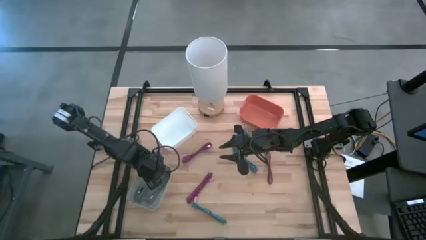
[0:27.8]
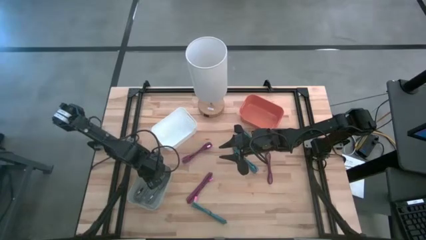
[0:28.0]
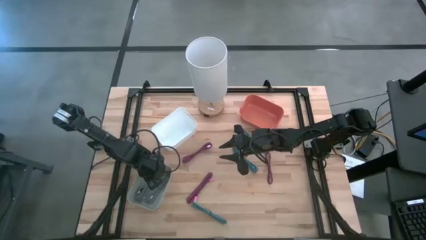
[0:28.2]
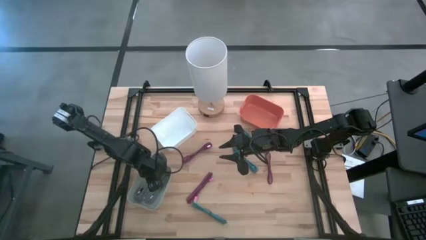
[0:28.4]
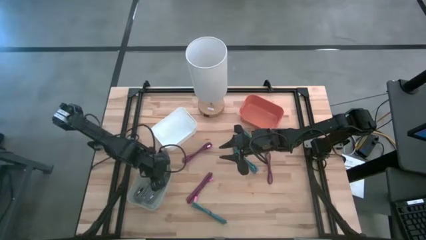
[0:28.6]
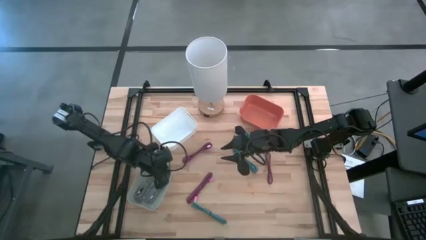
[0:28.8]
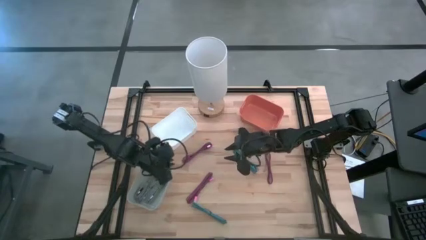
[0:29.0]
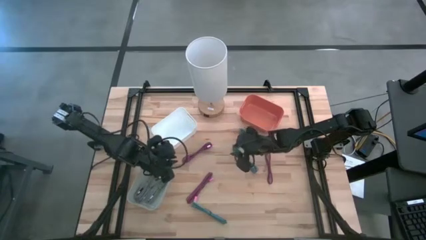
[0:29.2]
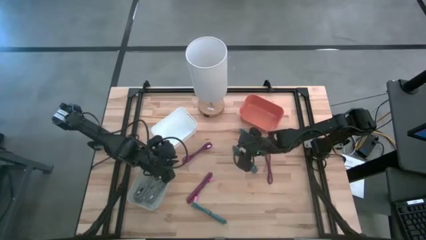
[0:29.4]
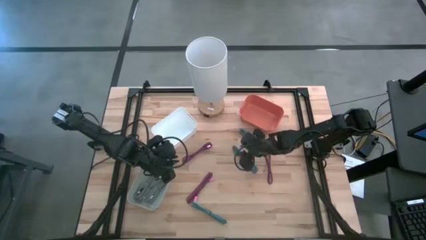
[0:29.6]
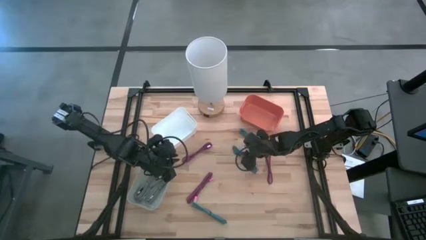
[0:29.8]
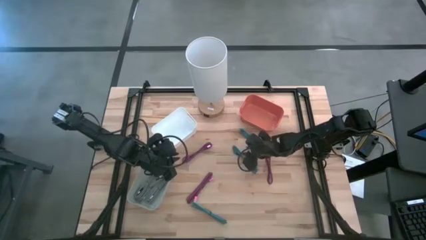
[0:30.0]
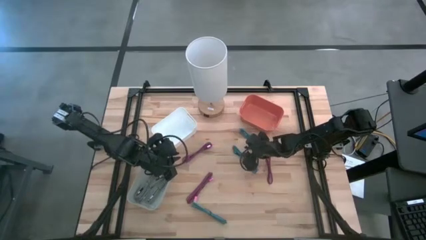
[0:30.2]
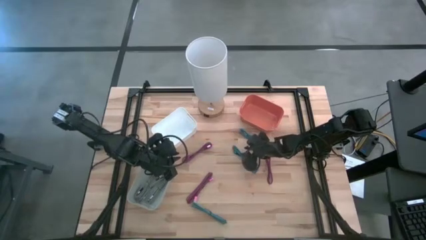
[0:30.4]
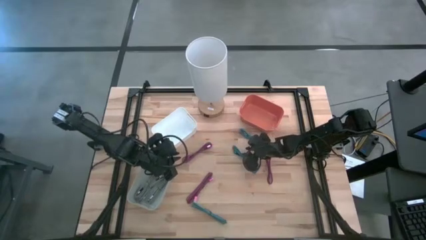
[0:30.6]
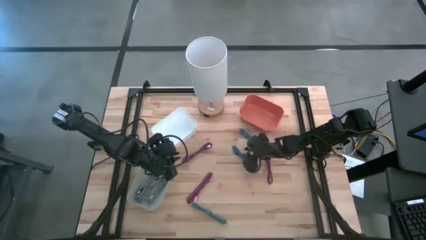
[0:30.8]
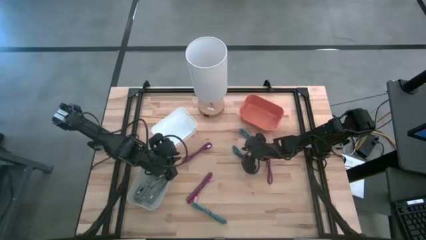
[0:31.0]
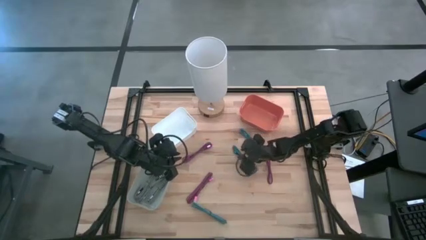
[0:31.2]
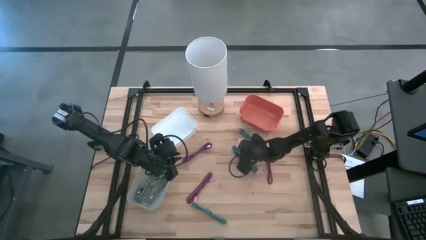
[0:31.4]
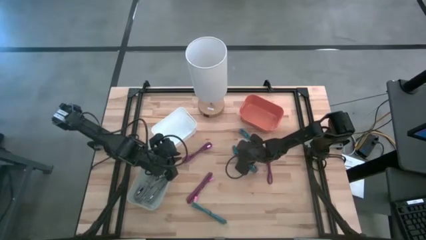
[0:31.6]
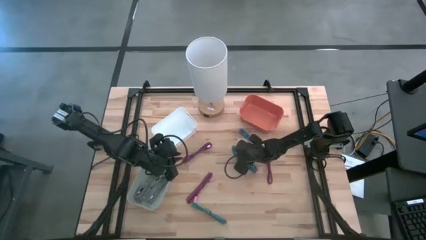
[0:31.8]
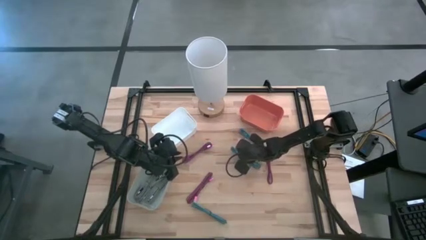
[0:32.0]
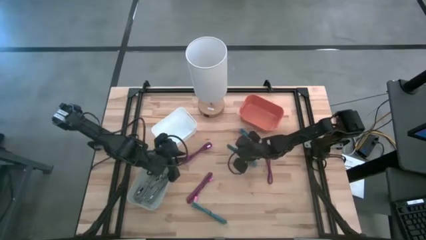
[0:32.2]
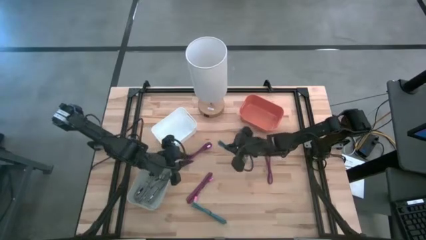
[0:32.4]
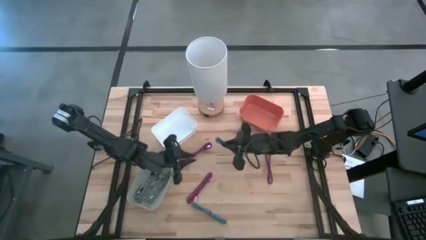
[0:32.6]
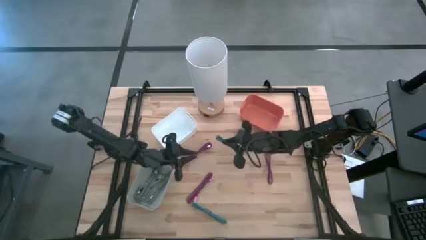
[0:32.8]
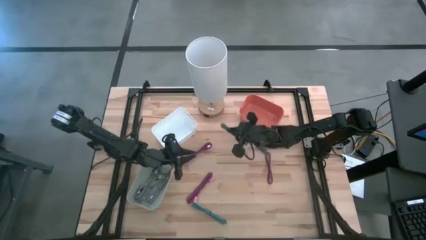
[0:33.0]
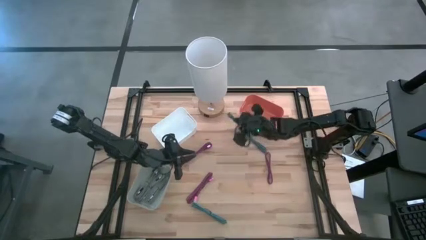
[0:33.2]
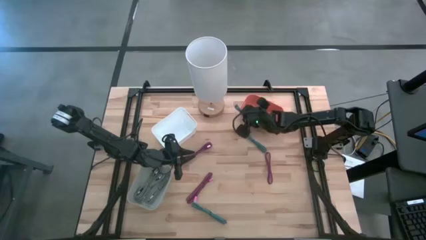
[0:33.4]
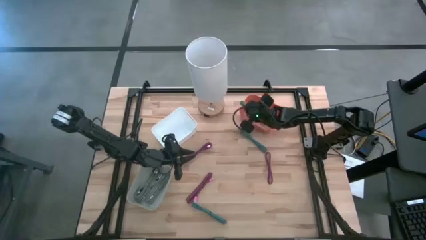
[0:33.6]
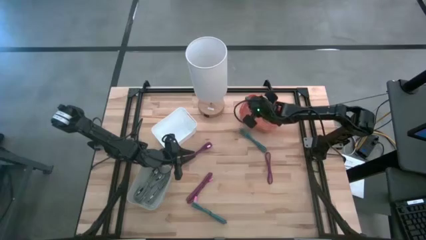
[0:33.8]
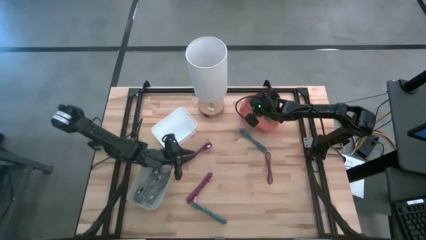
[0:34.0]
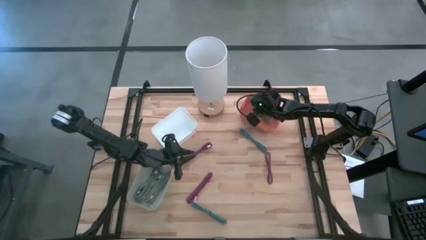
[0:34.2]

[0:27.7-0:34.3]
Task: Pick & Place USB Port
Put the middle blue and black charger cable into the orange bin

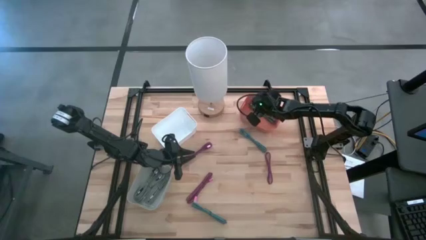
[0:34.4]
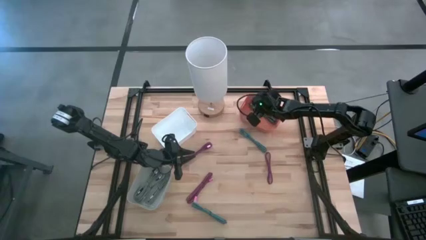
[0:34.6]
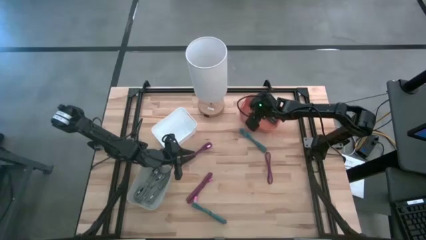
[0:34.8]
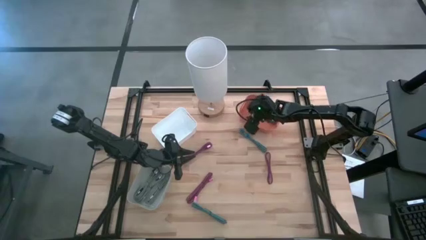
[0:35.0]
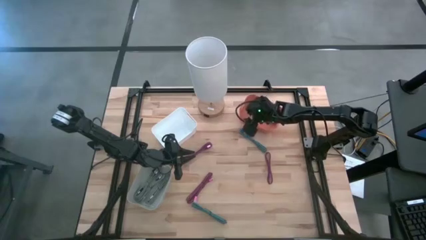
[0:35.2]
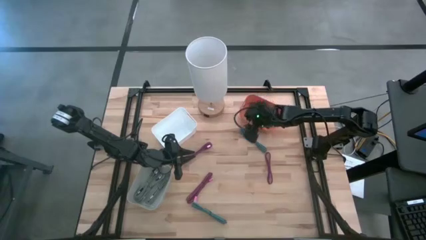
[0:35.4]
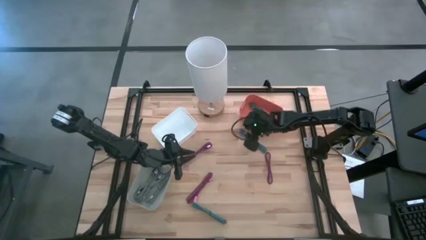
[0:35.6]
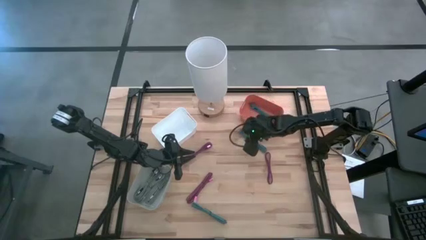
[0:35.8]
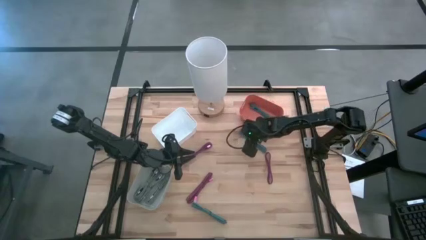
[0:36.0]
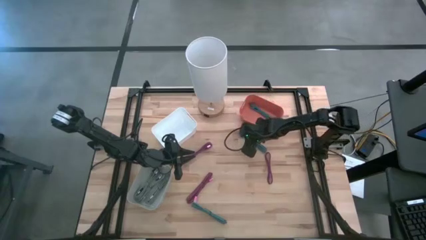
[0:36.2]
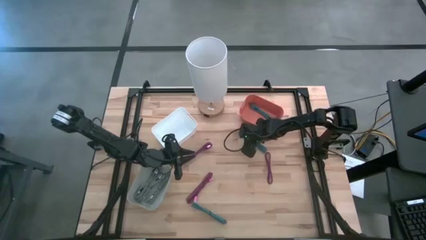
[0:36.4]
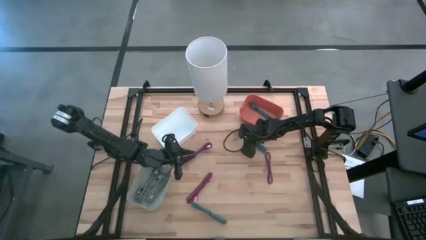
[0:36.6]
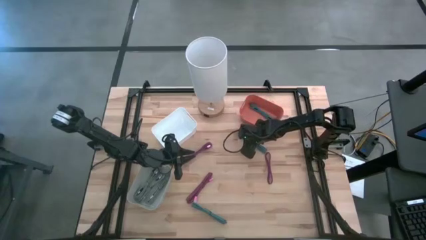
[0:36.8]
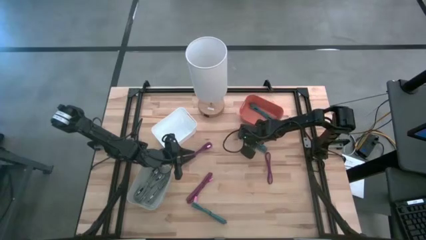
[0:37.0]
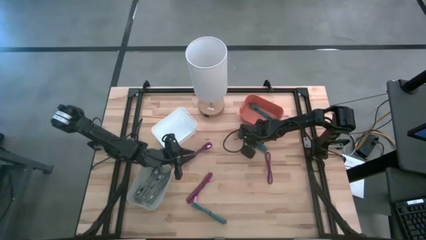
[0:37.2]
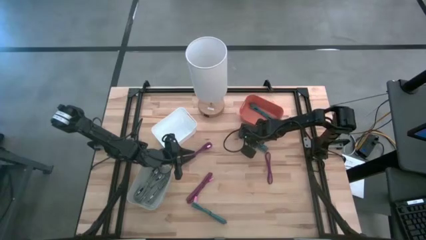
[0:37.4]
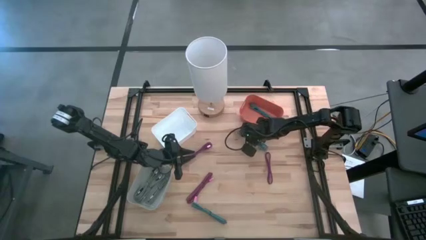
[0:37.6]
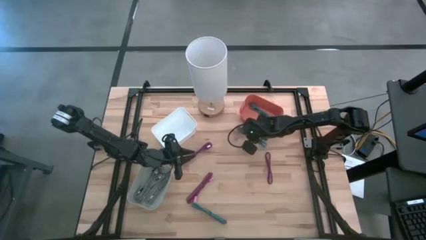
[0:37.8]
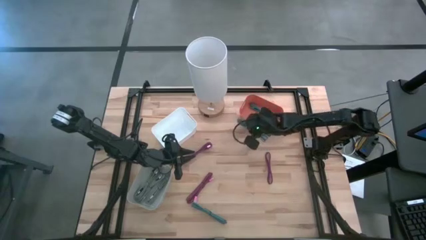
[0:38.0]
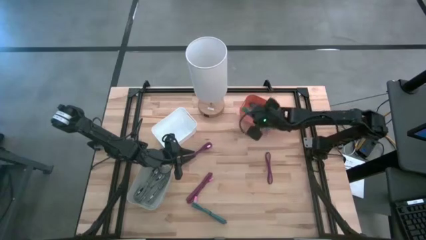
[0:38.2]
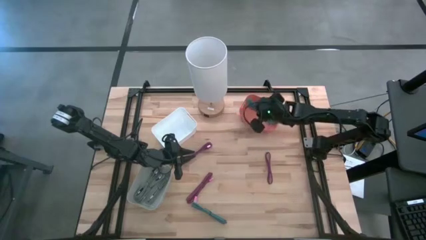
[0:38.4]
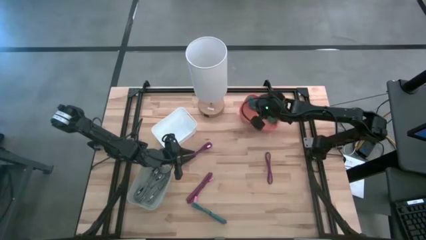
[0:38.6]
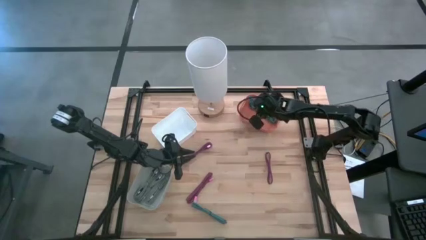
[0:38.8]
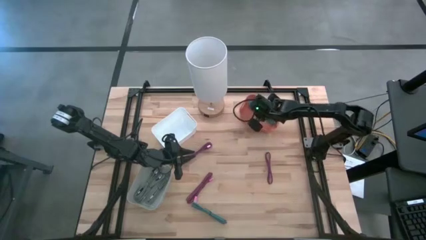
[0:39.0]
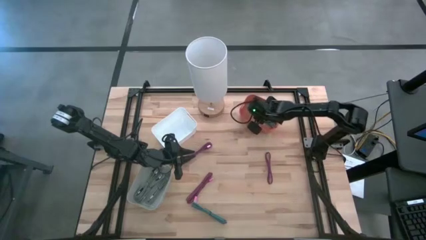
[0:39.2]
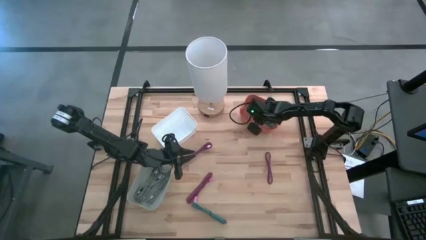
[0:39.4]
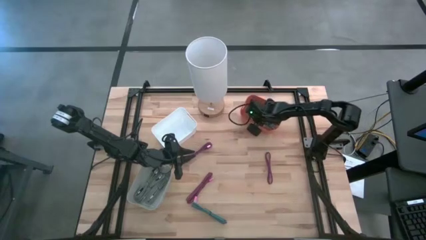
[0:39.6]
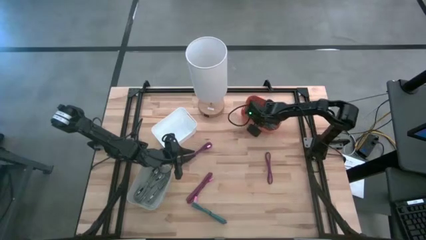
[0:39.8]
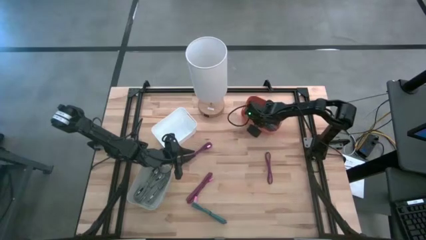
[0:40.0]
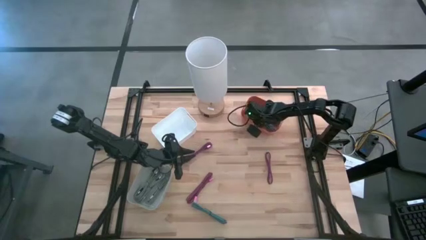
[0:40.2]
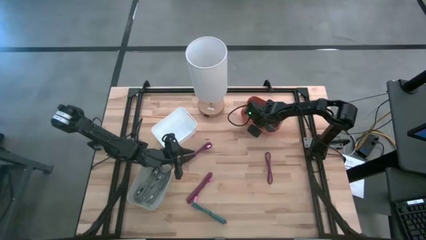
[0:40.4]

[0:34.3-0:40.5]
Put the top blue and black charger cable into the orange bin
